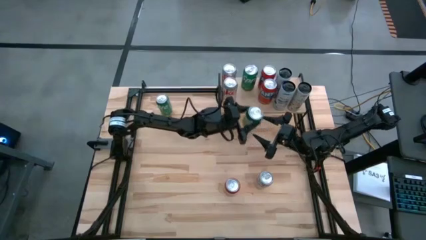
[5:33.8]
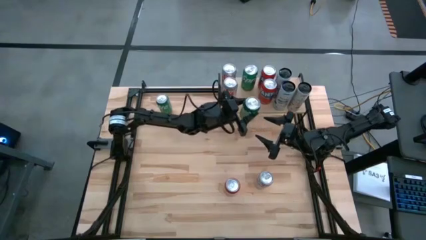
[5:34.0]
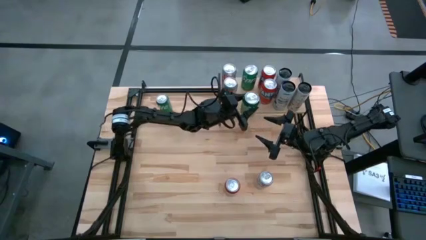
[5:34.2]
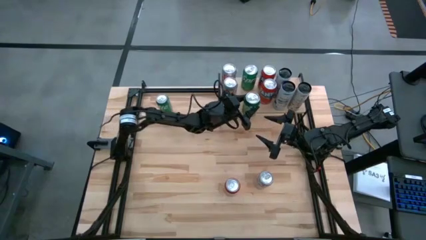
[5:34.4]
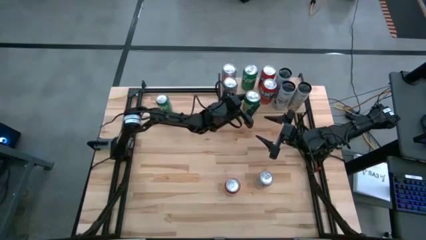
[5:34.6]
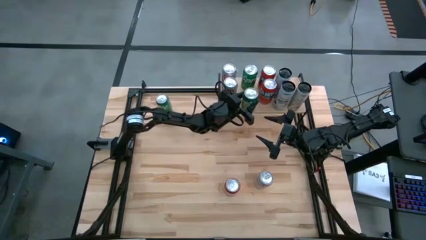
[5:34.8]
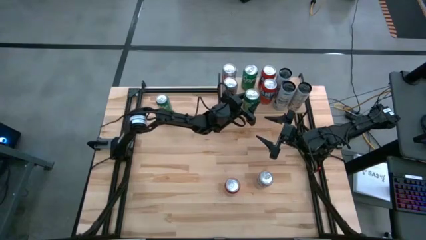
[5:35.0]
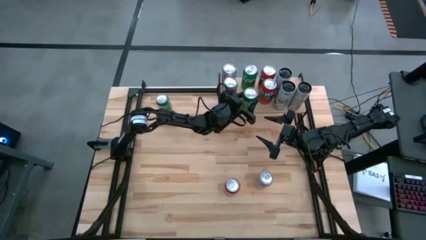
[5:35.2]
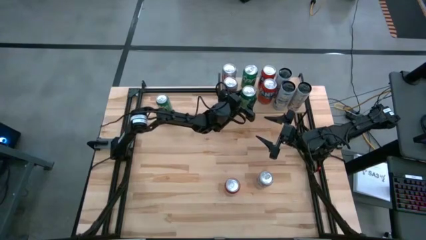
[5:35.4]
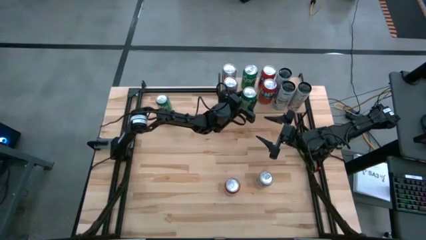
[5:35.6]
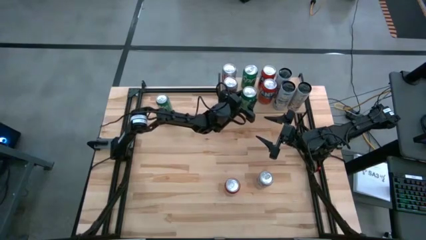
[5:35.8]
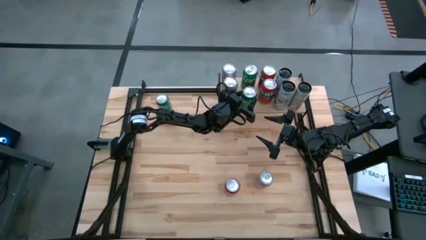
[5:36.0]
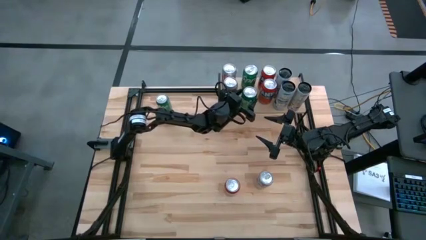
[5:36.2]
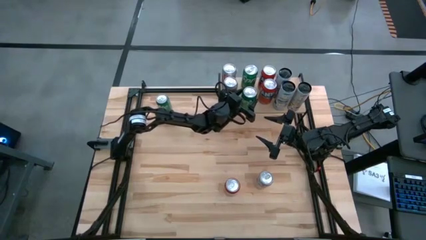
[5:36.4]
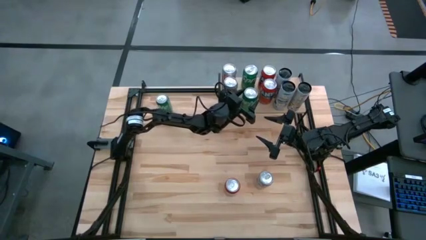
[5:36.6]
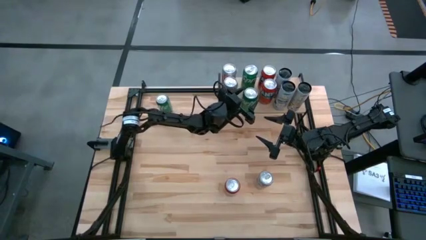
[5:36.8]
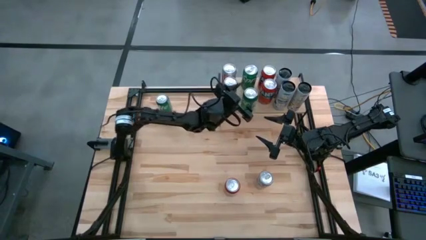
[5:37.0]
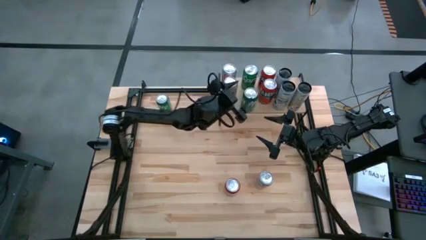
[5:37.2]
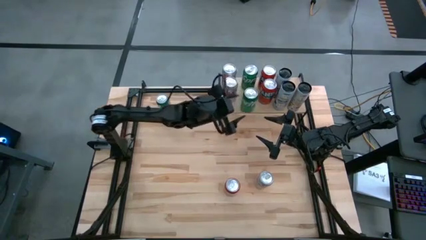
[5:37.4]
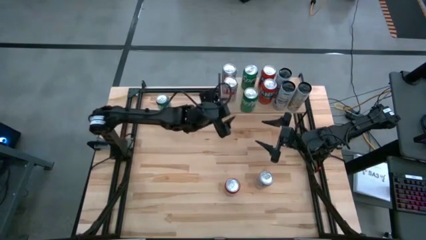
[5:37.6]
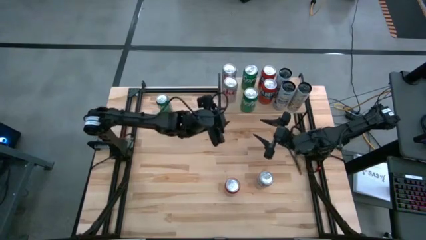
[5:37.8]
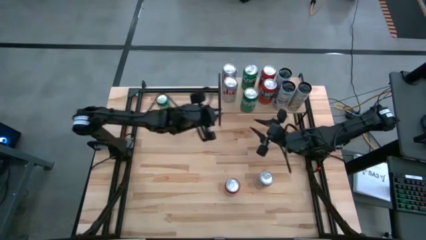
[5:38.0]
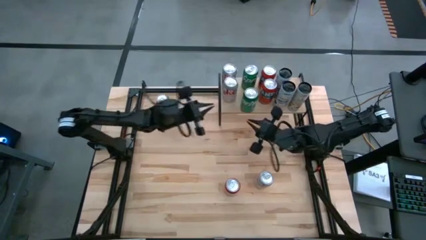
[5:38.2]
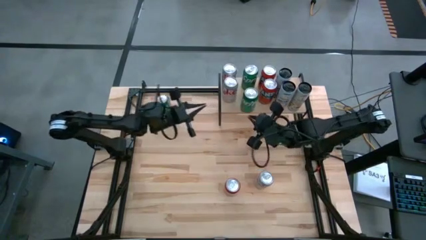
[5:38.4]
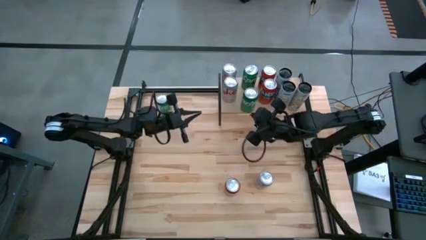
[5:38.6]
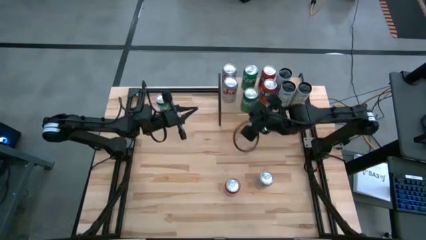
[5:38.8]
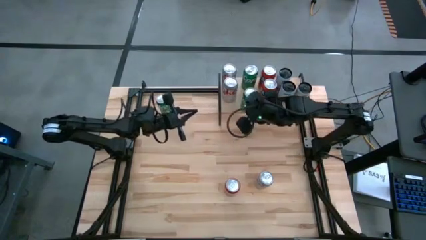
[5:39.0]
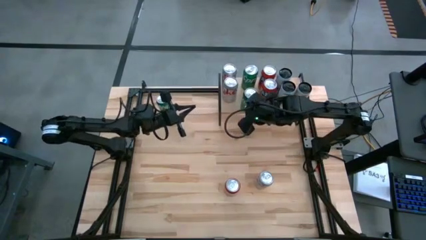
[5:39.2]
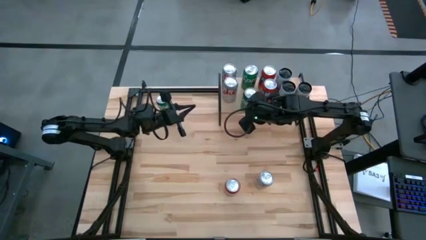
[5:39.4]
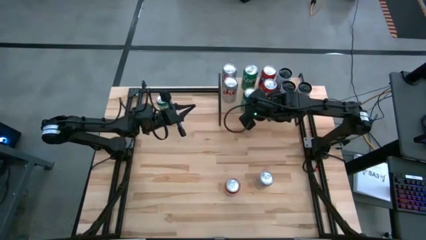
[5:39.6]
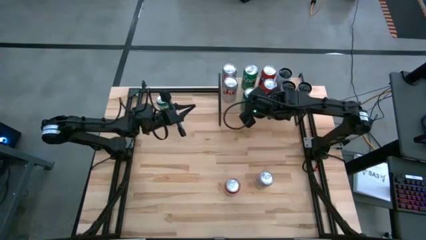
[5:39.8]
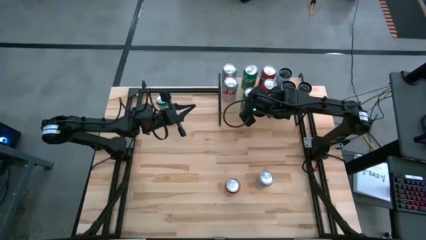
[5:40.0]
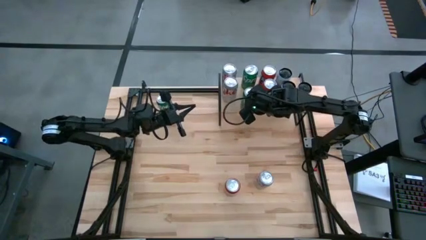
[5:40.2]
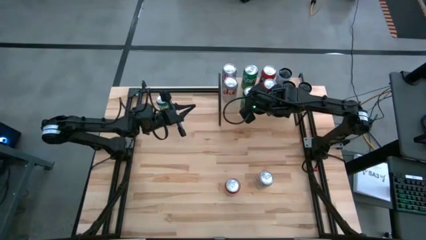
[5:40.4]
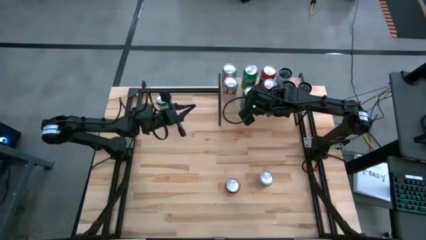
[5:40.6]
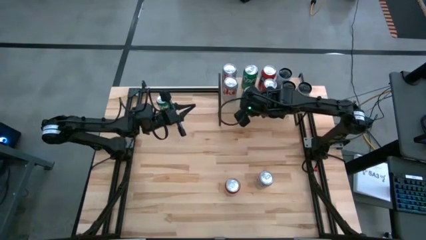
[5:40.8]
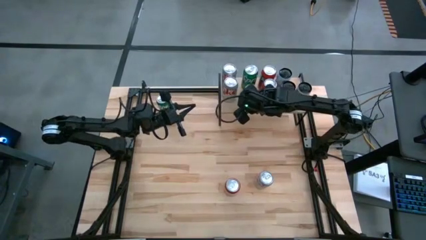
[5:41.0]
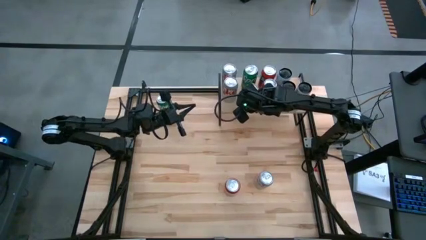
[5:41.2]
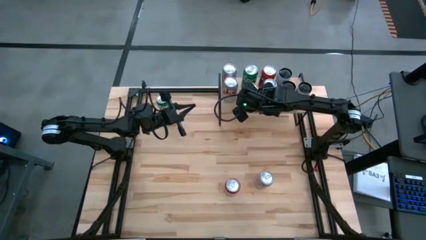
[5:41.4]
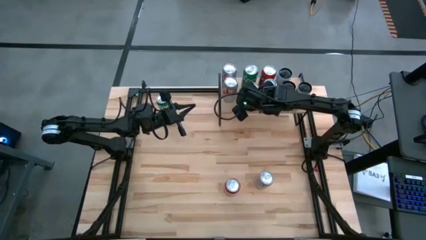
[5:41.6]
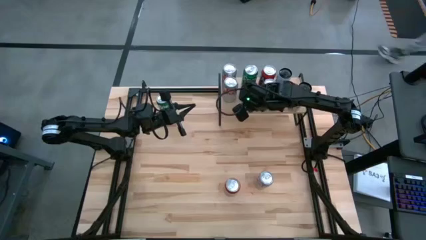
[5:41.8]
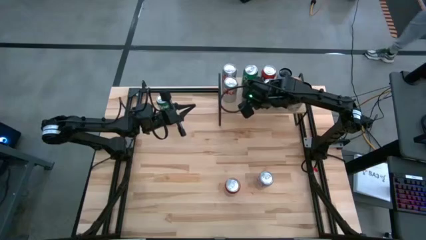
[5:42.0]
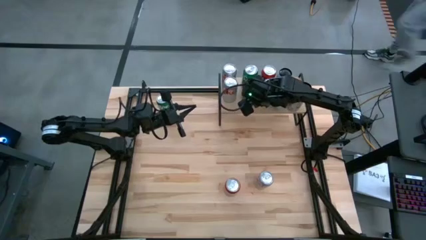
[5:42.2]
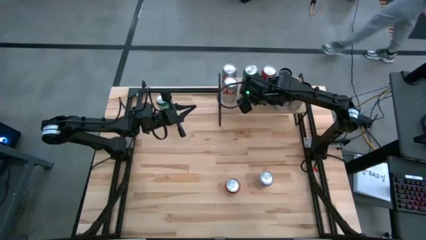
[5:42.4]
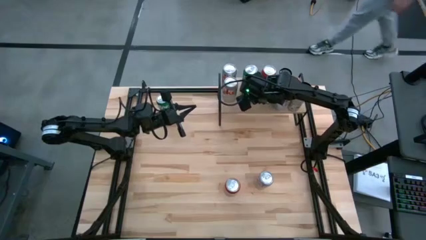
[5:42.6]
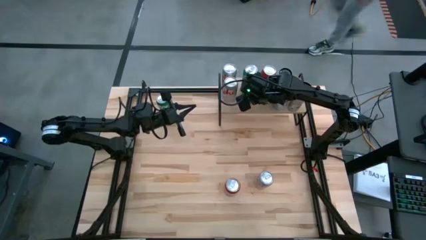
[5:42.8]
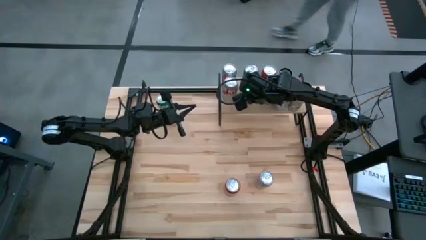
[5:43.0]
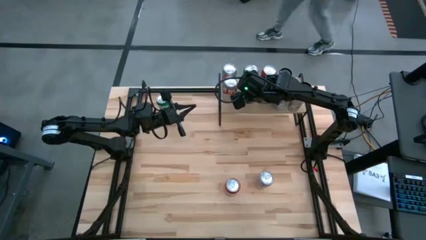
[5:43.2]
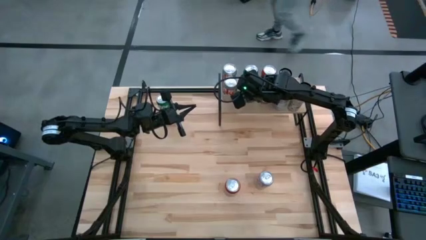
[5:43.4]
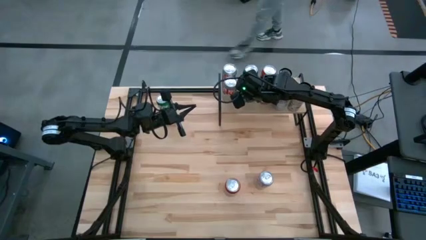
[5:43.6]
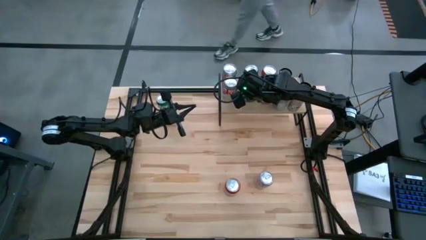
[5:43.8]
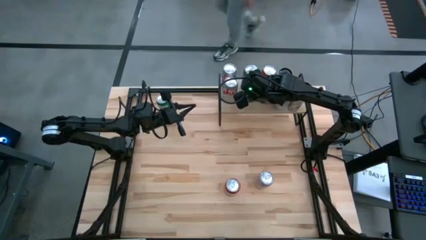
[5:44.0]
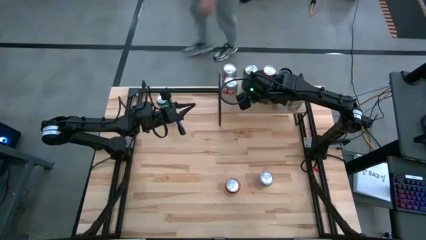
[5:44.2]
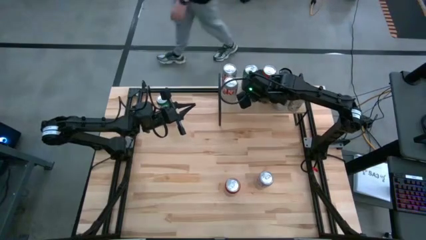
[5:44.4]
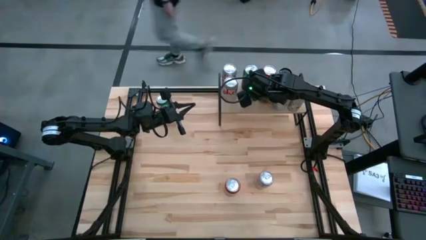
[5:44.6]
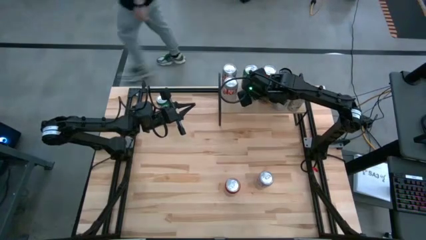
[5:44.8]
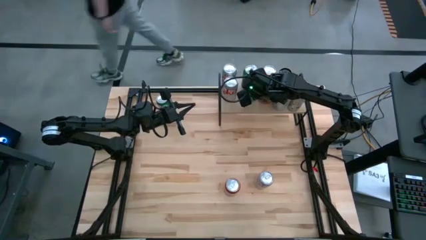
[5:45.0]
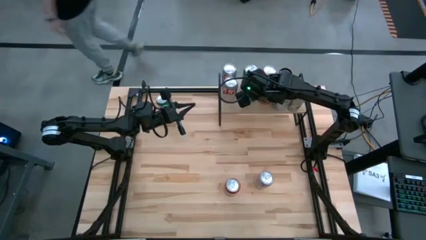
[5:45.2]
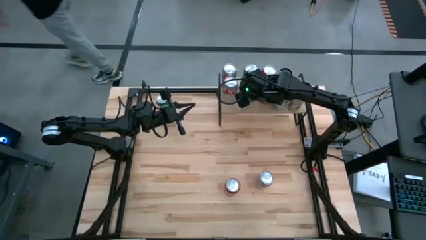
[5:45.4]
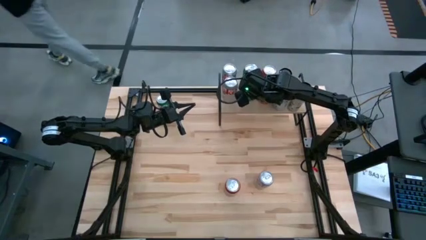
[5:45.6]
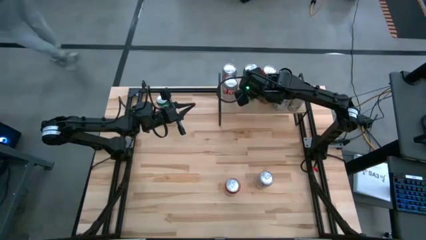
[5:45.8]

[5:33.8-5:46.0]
Task: Place canned beverage on shelf
Put the bottom green soda can on the shelf aligned in front of the other green soda can
